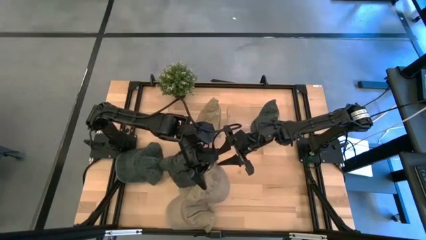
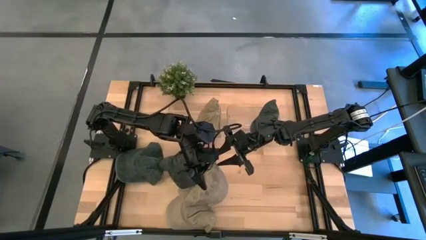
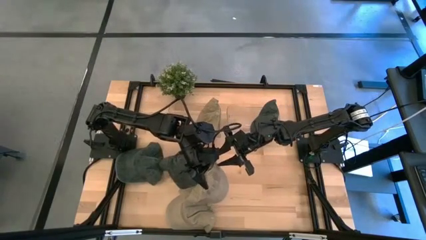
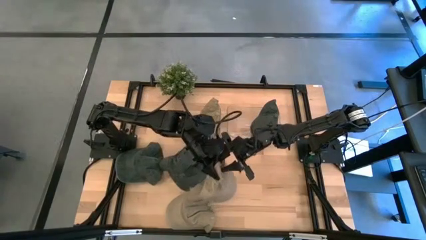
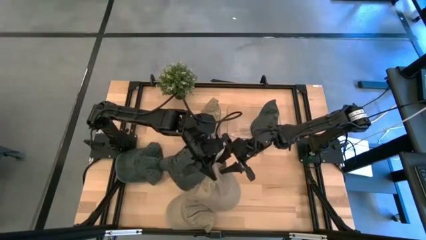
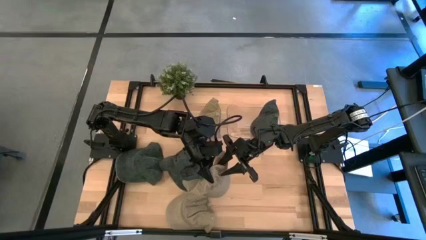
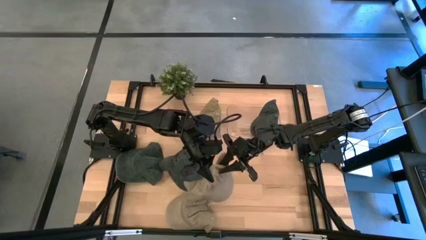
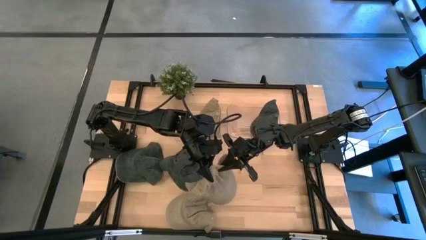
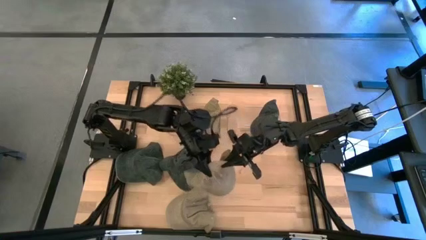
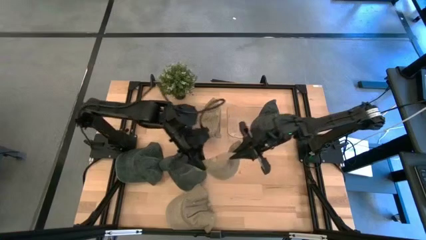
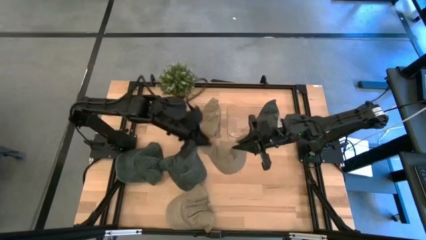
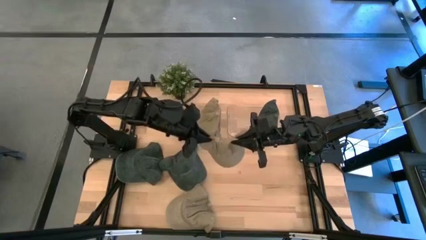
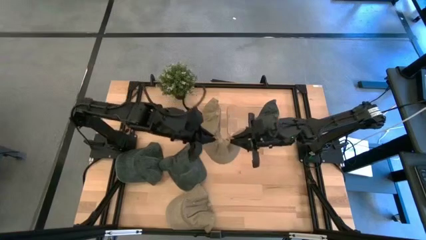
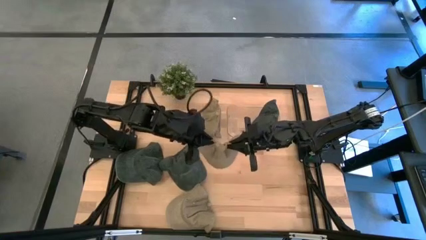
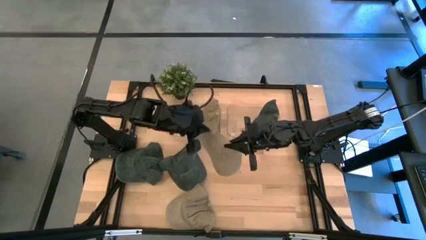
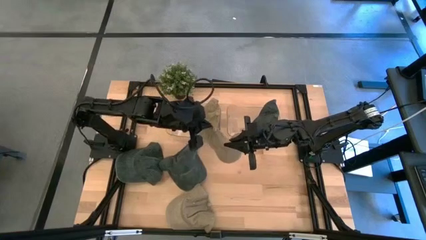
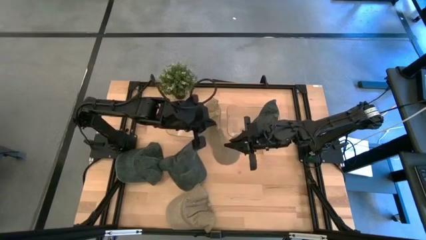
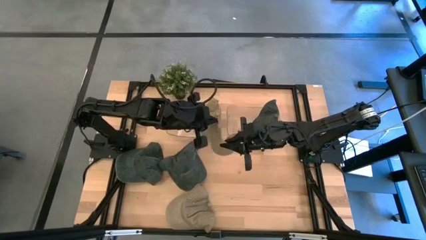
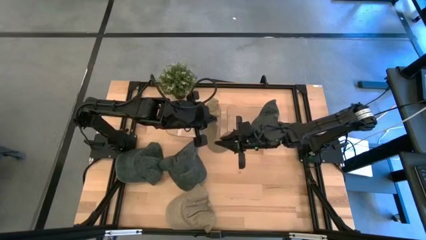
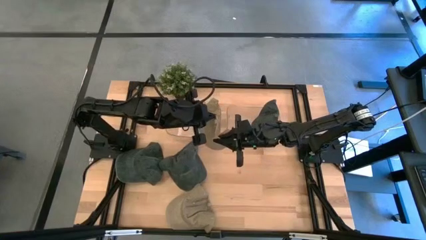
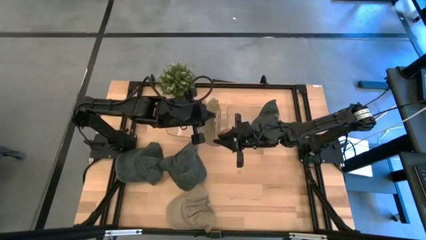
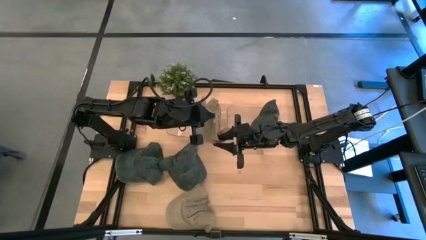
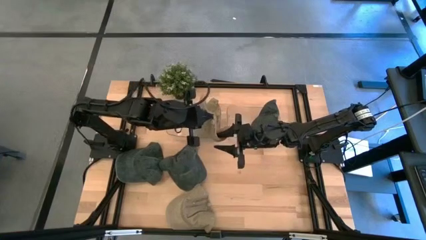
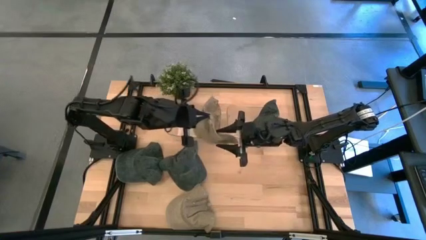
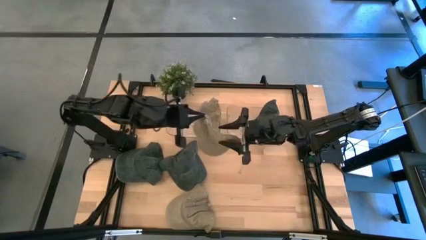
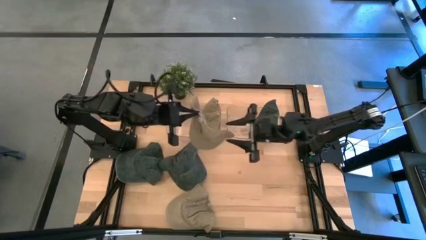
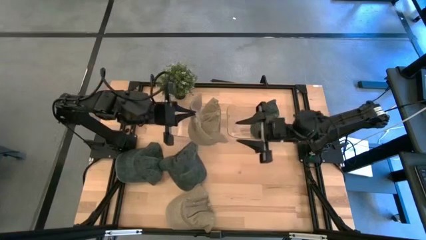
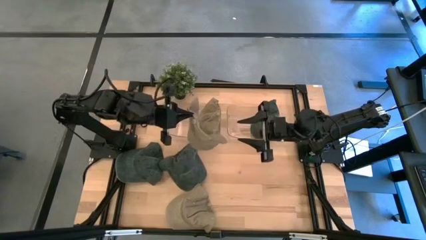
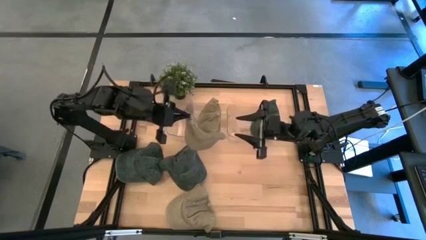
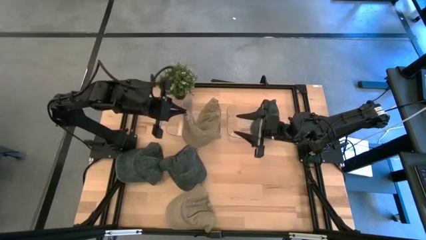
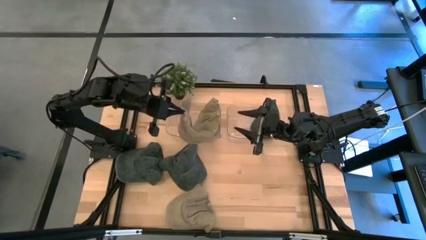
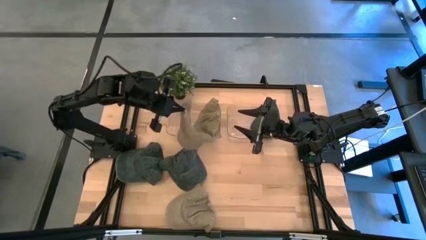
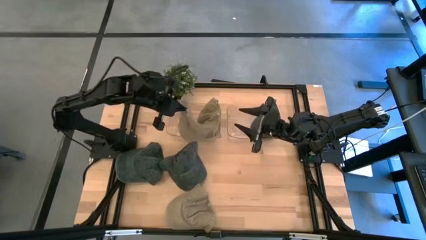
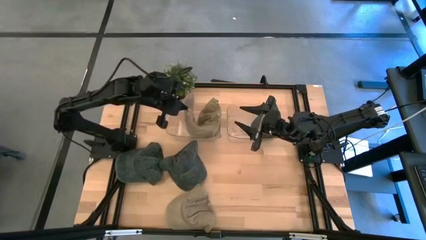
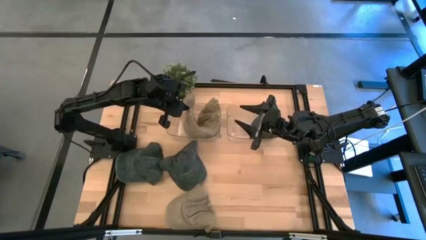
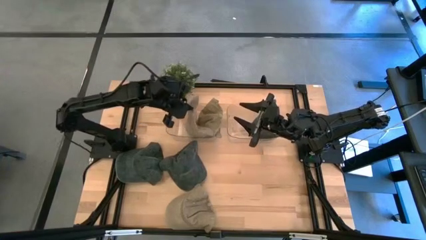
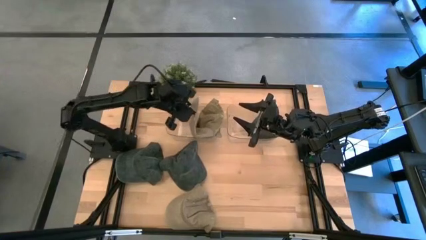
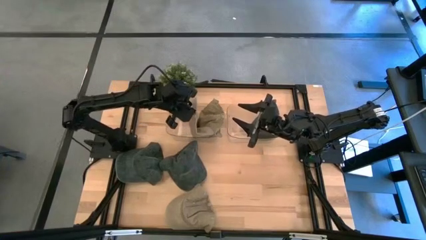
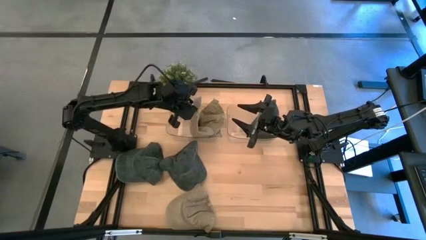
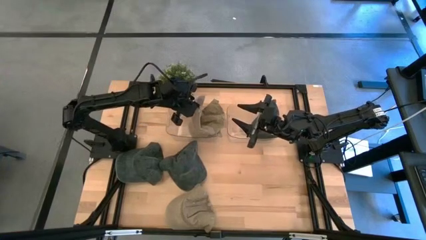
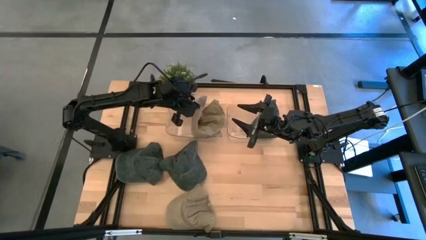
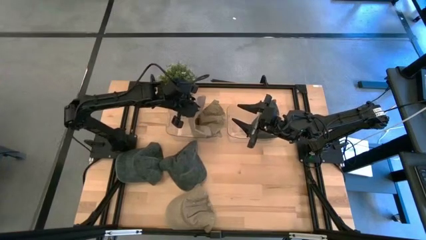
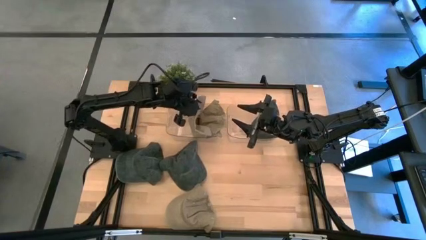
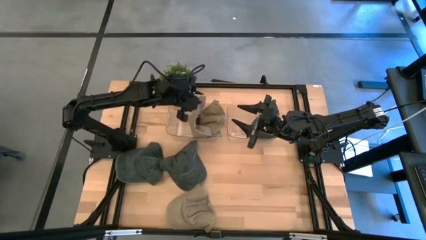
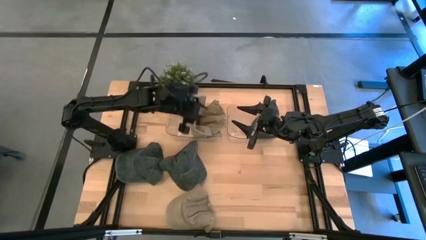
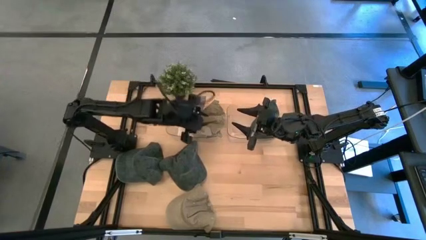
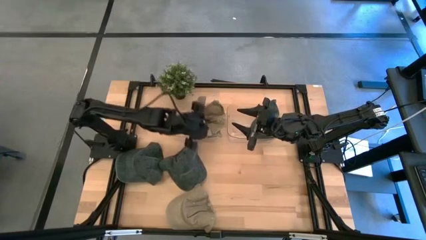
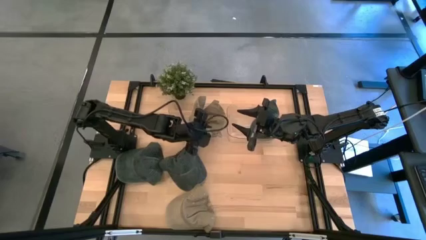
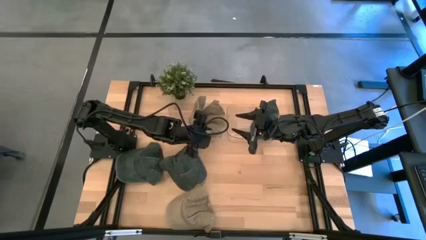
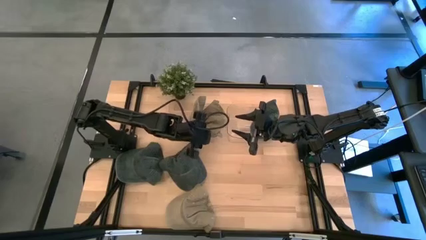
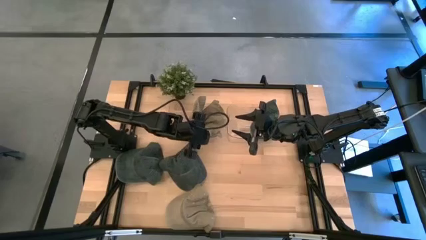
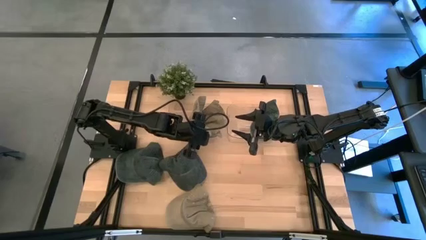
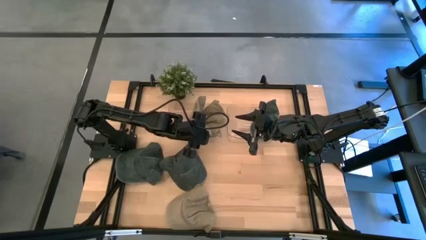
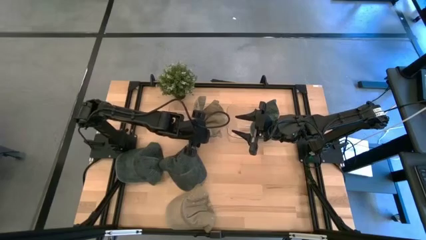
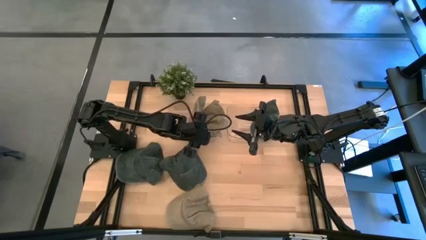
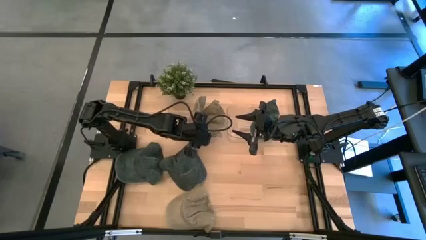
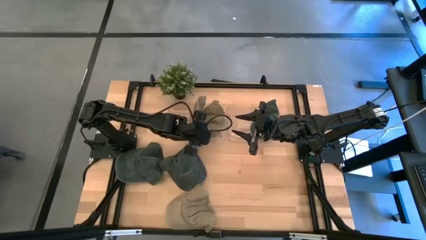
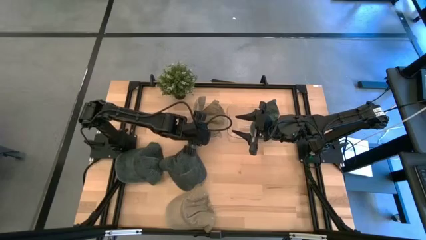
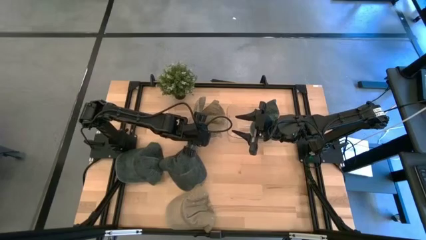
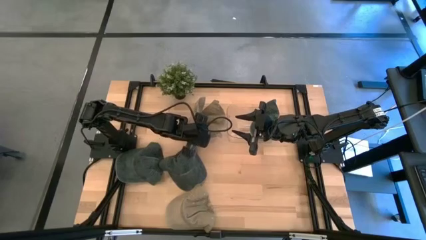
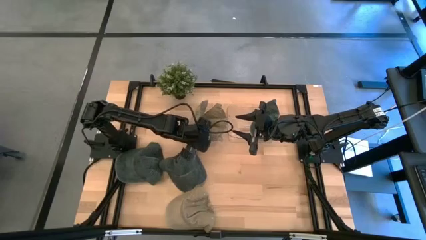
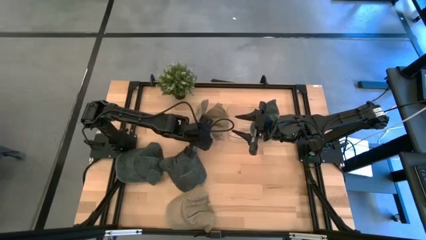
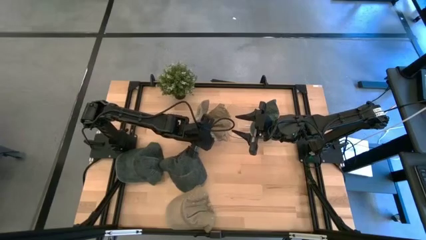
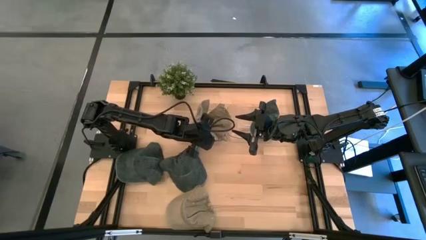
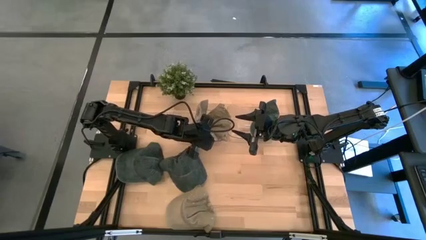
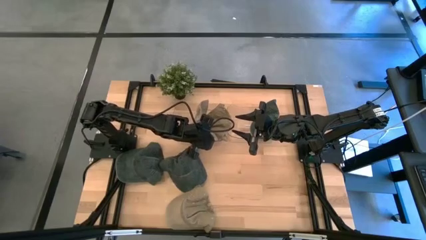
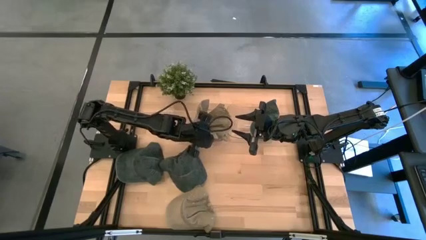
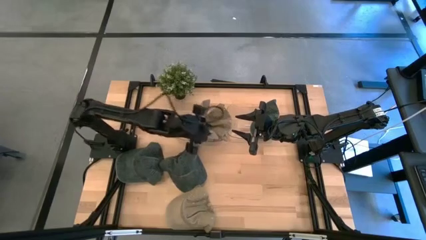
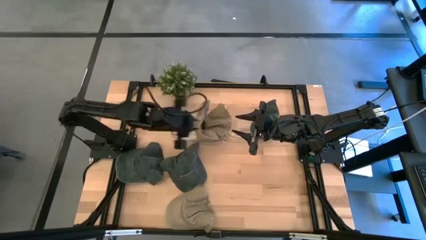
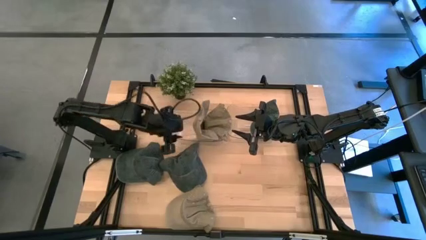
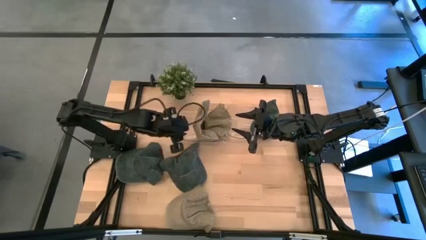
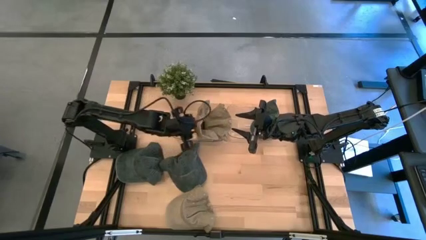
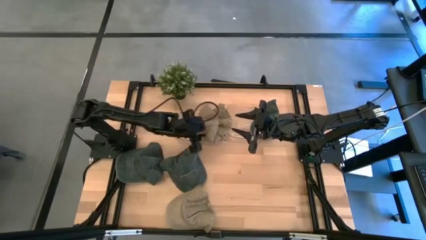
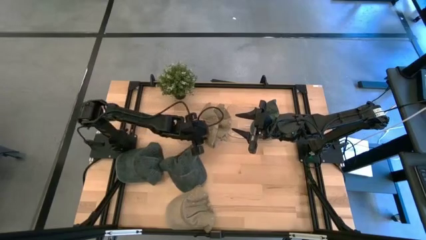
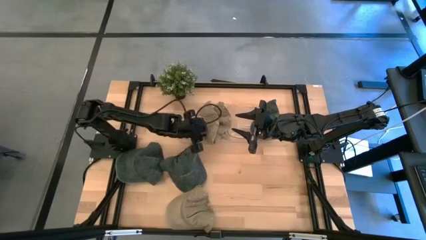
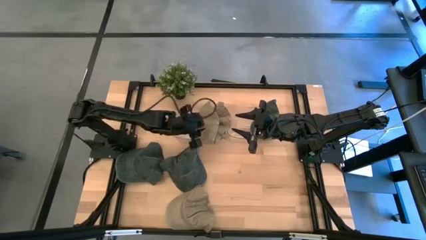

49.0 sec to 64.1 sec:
Task: Pick & Place hat
Put the right brown cap into the left transparent bin
